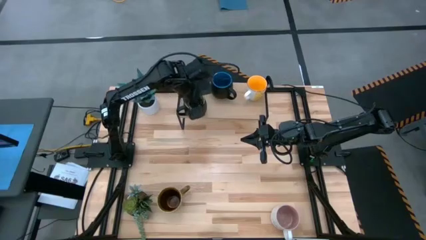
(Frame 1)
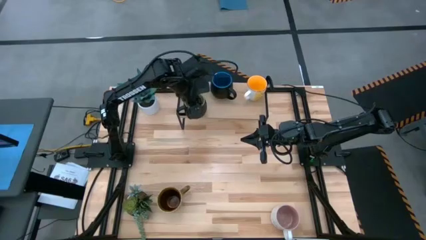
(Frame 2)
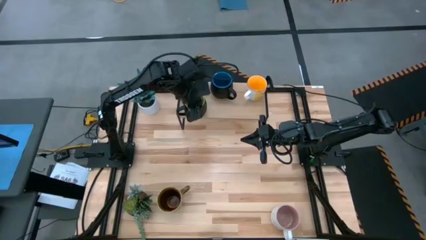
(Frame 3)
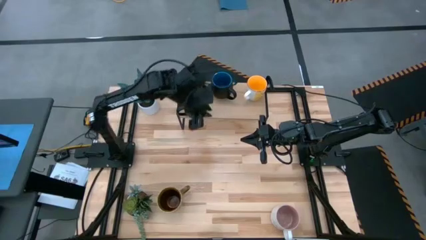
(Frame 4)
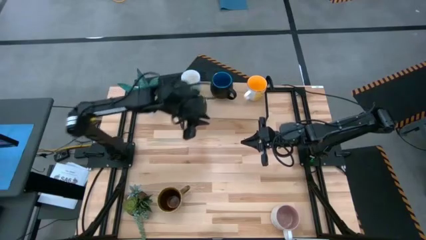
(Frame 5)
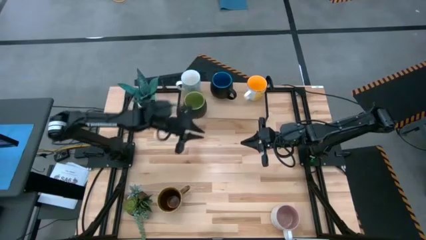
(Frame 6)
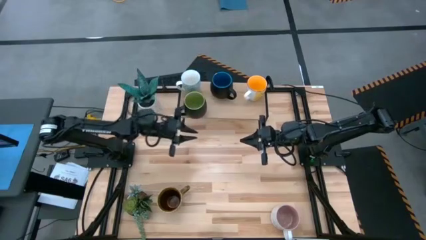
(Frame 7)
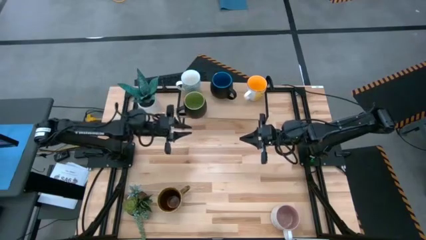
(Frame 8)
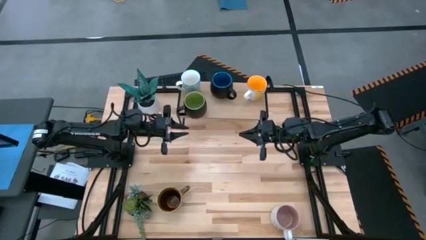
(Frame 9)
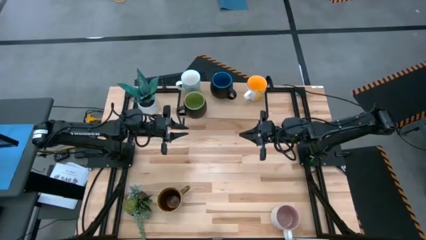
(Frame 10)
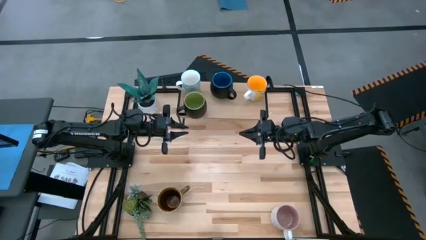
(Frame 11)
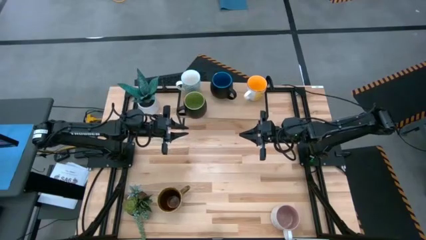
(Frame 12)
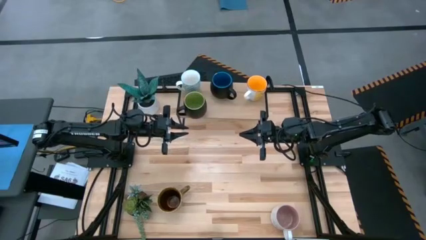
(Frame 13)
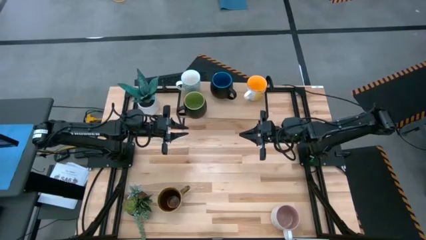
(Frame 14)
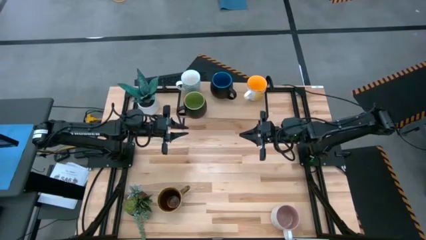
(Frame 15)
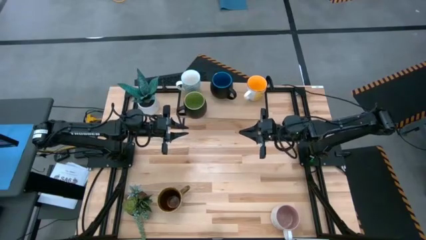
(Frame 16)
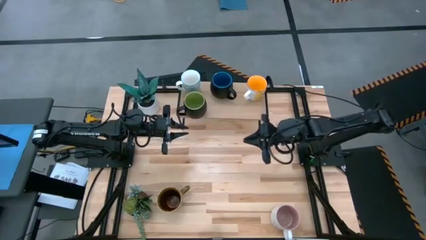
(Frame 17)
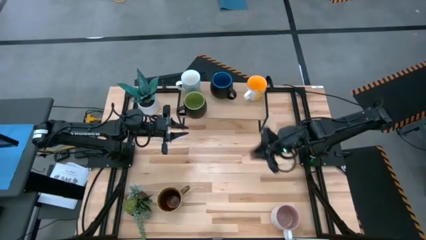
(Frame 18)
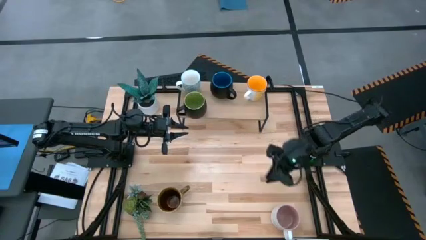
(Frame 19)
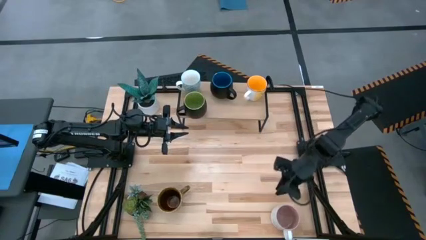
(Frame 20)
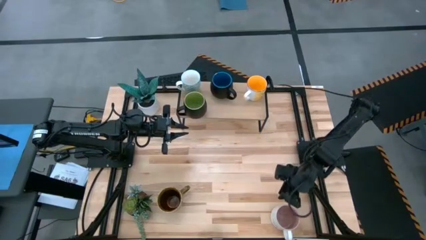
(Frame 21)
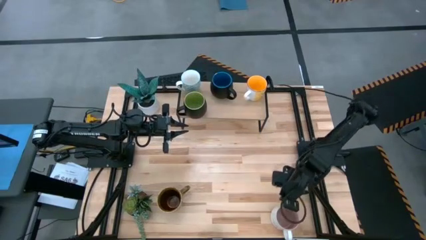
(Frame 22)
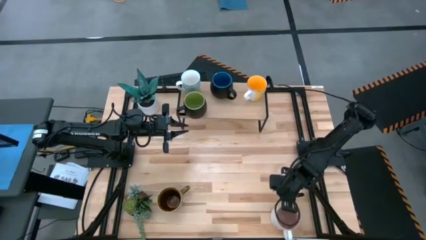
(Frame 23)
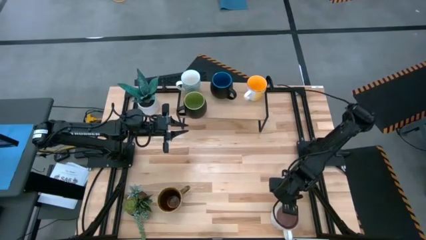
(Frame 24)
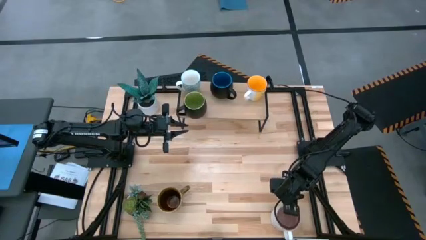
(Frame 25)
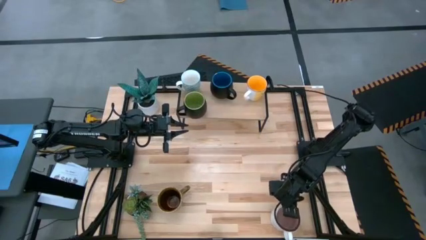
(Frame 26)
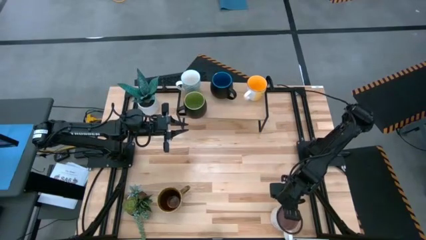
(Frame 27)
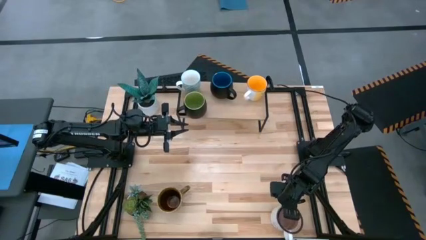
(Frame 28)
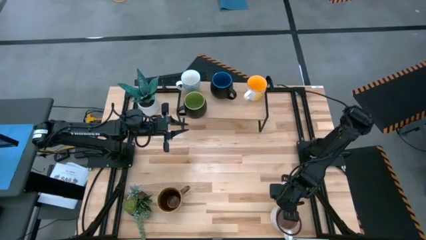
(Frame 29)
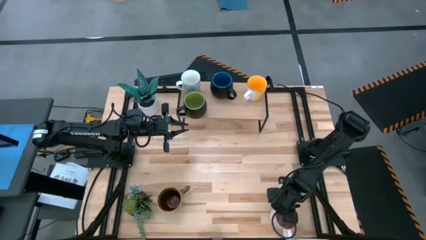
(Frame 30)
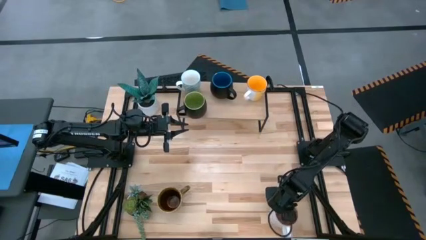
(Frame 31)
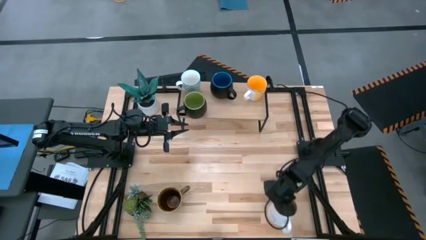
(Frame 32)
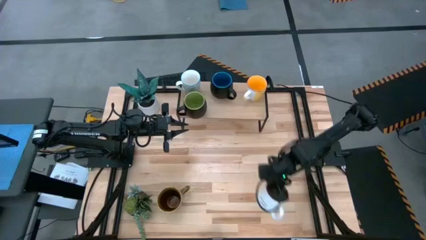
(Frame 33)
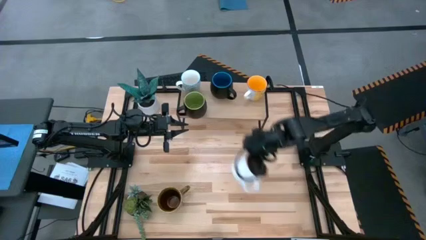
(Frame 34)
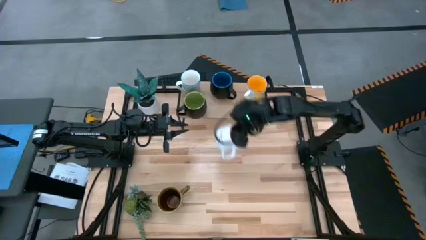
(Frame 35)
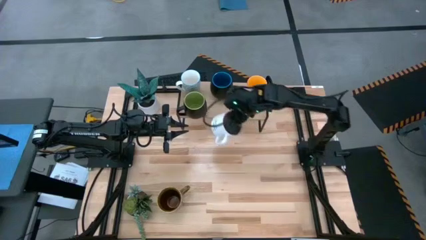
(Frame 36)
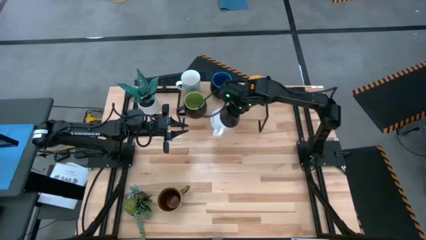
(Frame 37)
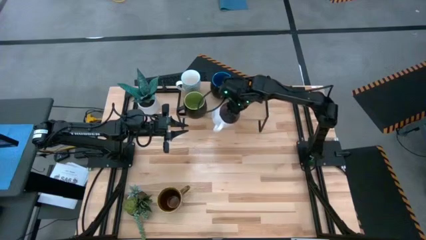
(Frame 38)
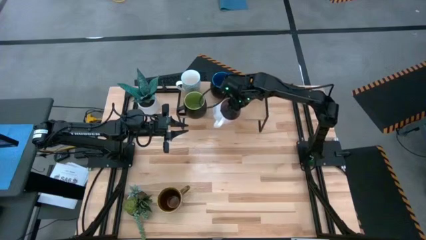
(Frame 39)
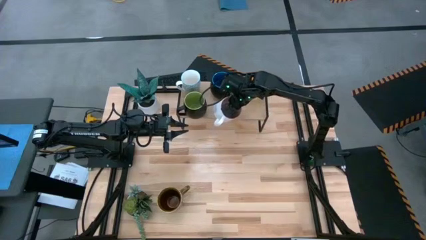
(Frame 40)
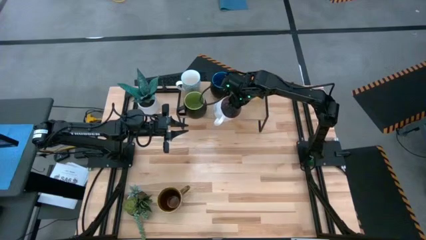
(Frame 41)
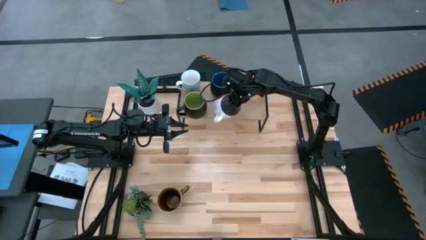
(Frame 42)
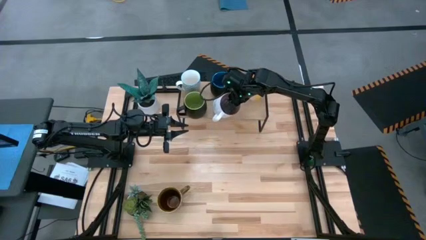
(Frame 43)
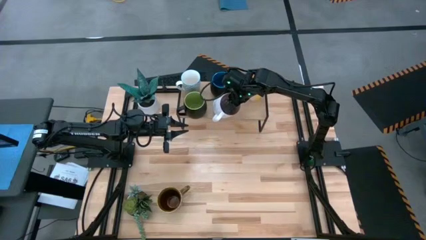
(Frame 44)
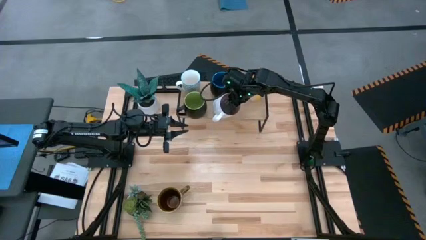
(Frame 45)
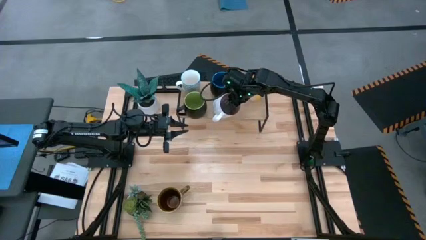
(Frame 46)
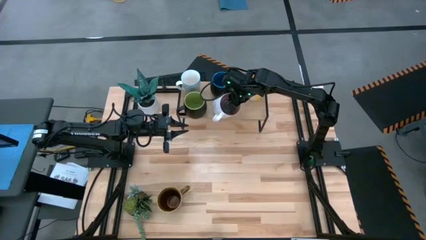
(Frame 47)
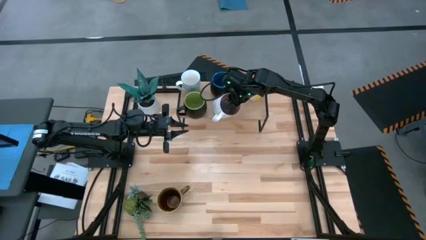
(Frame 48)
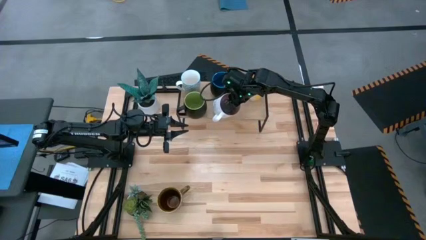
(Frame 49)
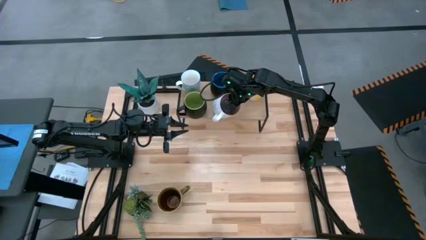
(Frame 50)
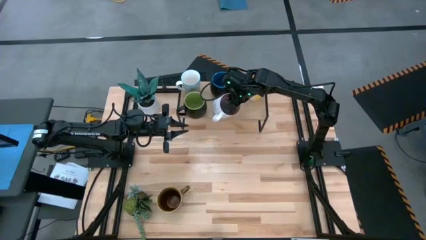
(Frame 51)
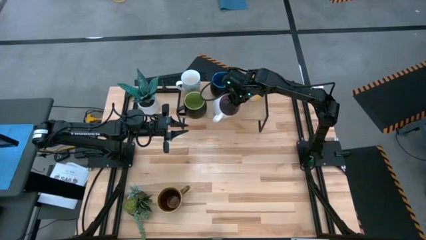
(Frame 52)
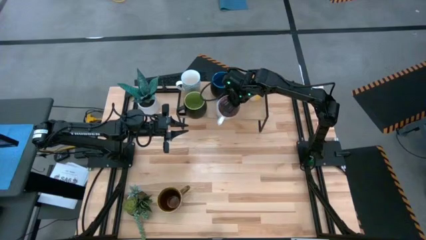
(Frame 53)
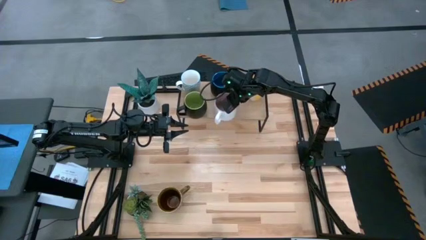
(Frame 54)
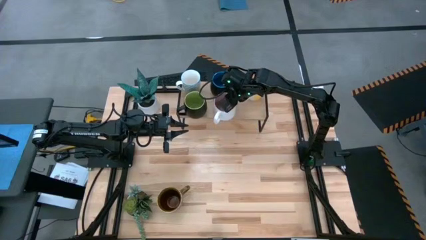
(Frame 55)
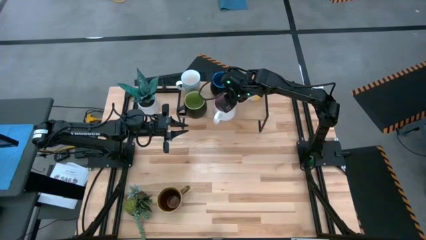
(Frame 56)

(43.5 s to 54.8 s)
Task: Place coffee mugs
Put the white mug on the shelf
